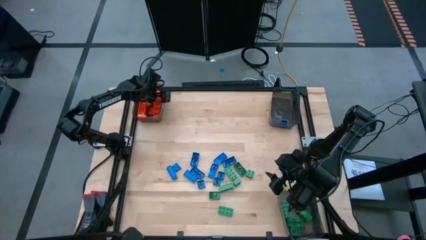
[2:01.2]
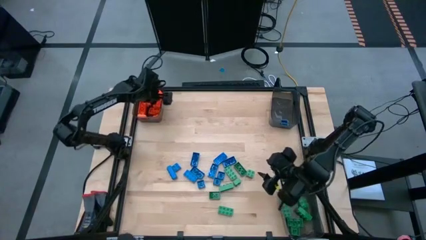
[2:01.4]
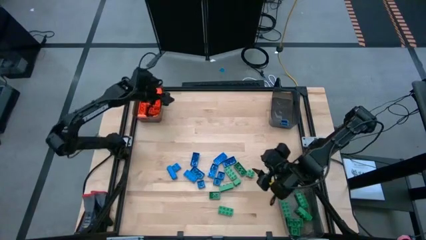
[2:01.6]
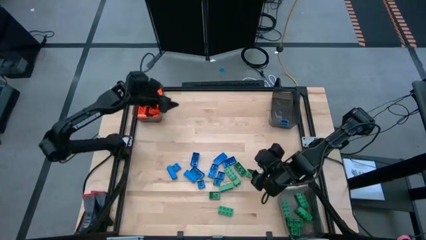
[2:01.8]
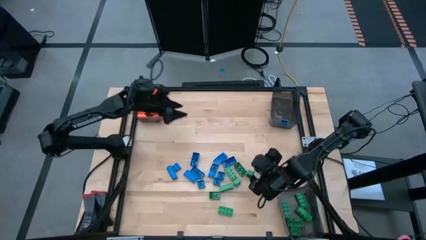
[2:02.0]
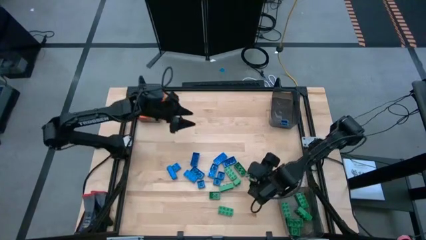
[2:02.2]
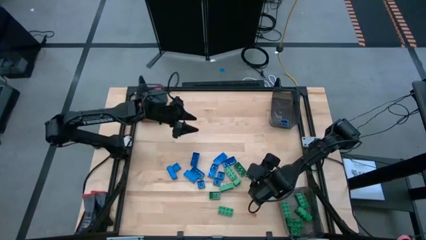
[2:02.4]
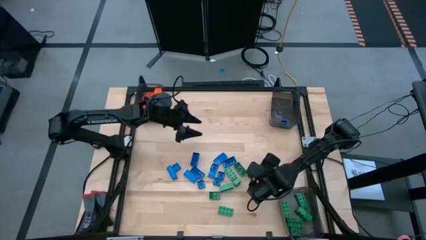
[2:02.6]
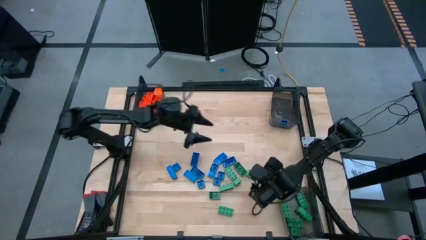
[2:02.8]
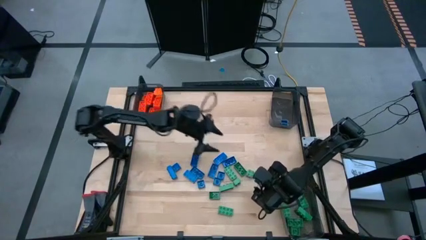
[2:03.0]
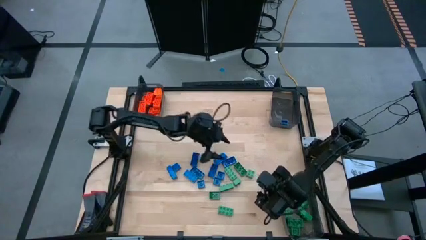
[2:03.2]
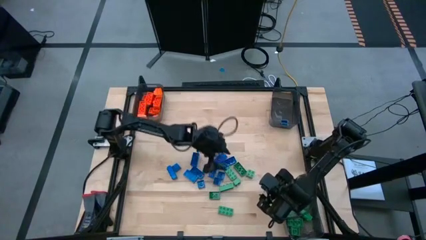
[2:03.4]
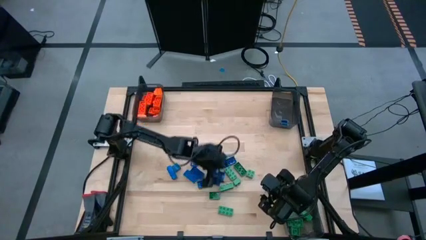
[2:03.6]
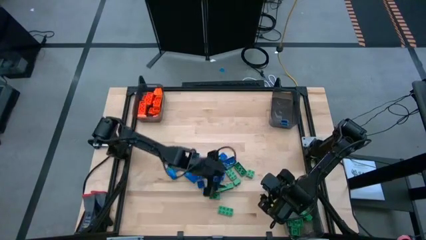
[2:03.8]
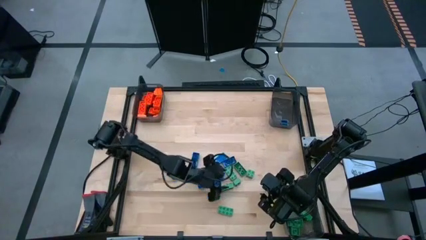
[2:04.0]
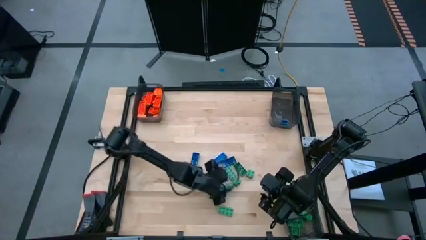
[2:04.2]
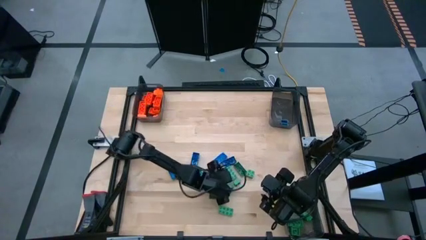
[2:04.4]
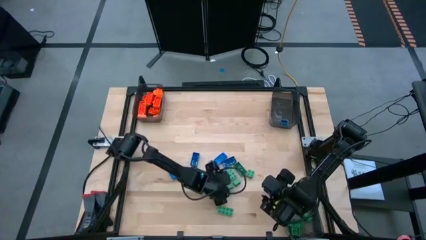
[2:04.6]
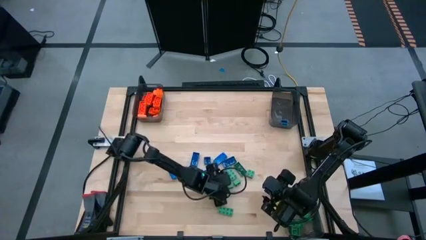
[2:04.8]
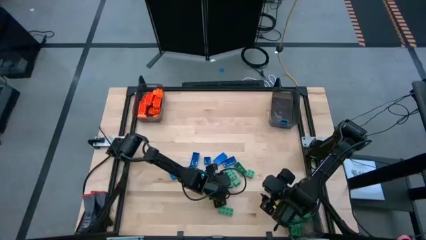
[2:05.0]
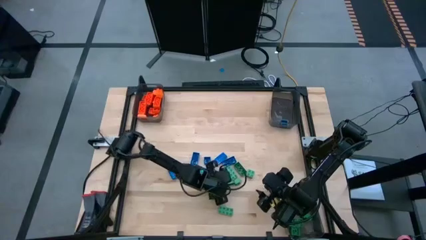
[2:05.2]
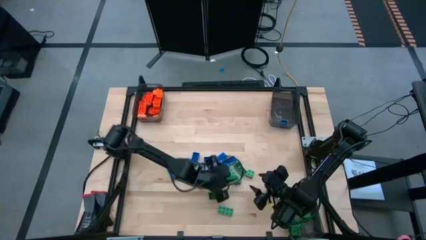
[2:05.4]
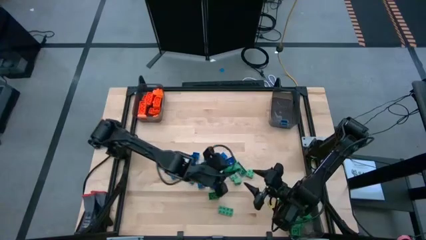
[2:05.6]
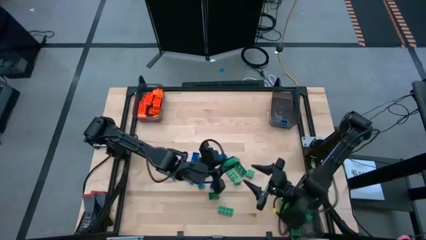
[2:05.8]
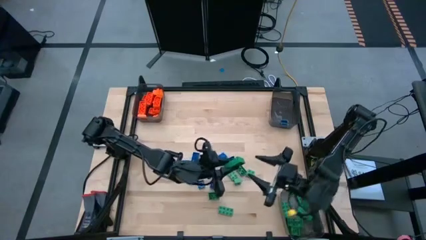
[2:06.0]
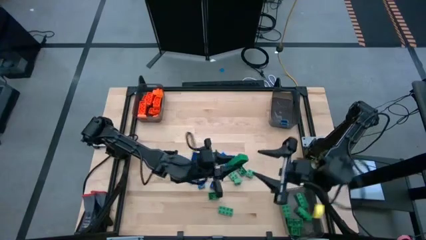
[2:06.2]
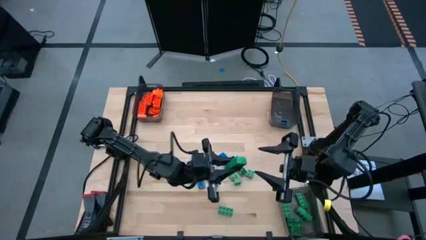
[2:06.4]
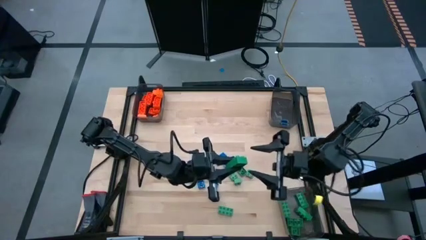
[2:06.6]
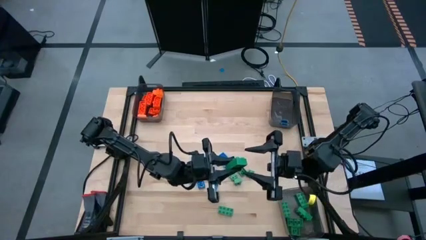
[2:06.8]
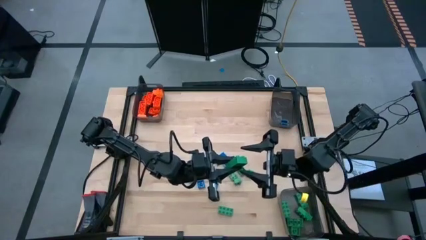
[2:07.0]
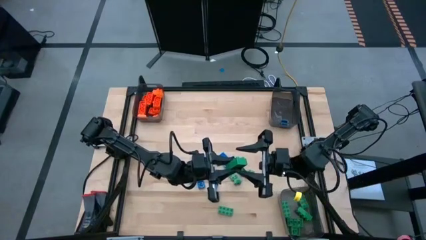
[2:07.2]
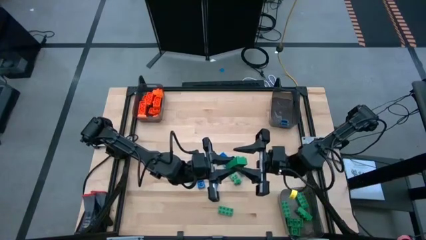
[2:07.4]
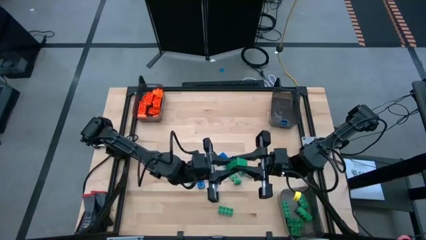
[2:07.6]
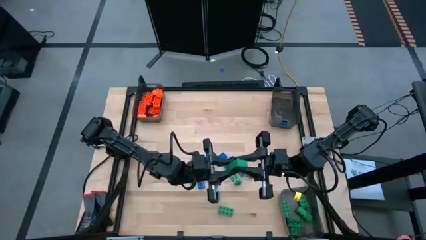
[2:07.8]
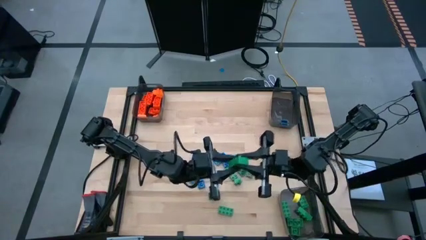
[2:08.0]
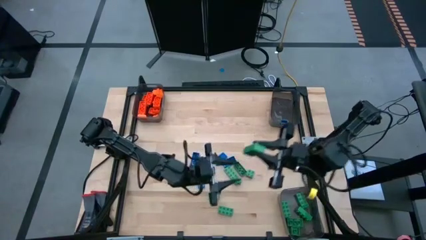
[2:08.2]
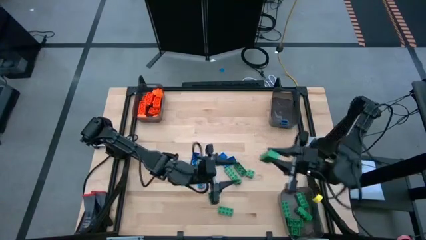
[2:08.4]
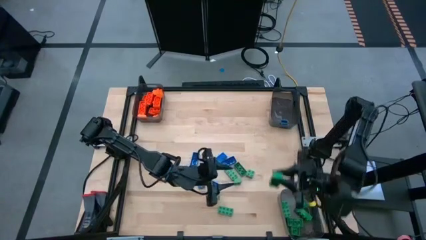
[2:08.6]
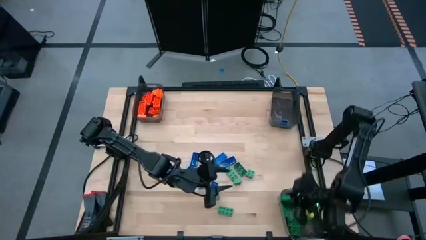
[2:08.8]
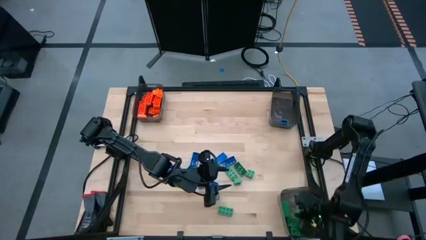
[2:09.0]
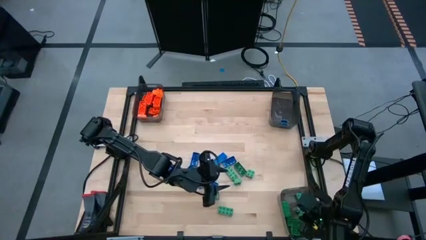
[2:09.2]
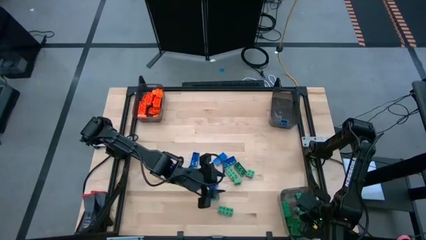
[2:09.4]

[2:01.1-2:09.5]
Task: Sort blocks
Put the green game piece into the bottom right black bin

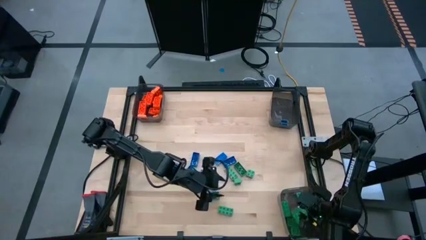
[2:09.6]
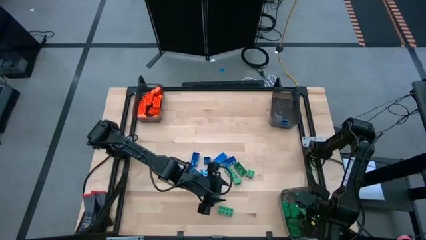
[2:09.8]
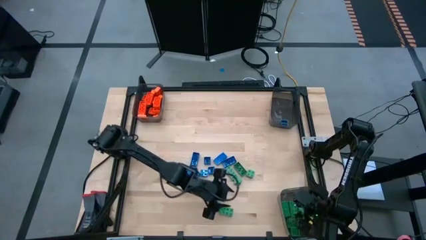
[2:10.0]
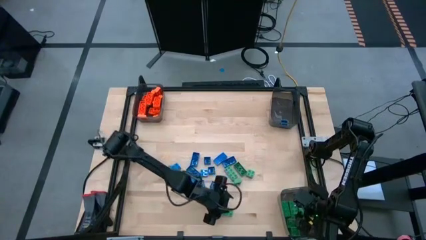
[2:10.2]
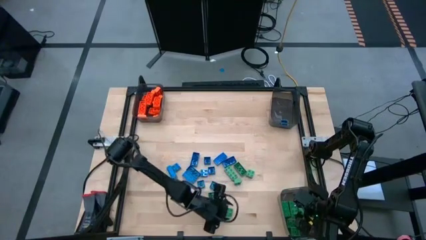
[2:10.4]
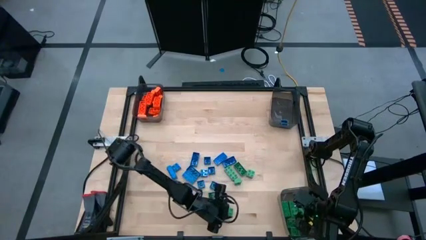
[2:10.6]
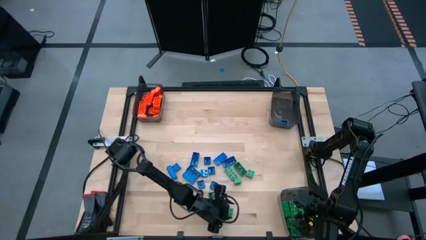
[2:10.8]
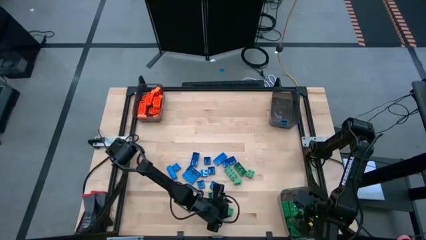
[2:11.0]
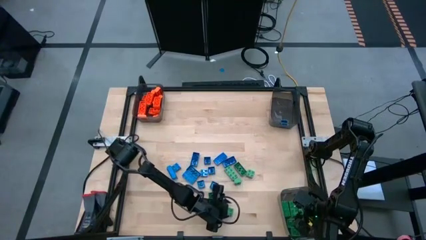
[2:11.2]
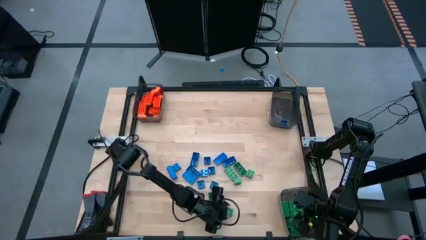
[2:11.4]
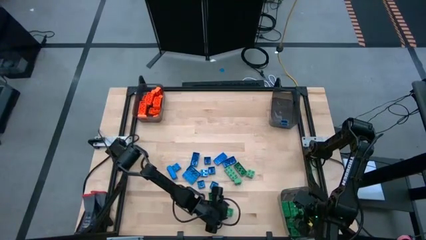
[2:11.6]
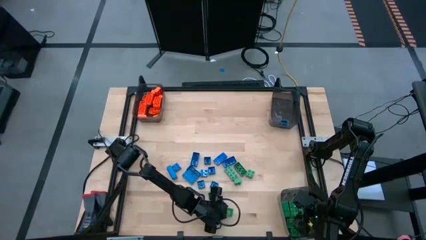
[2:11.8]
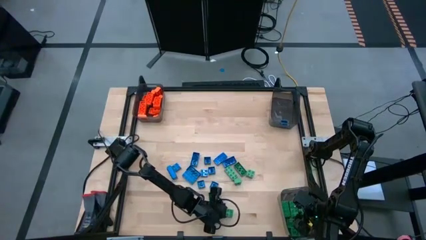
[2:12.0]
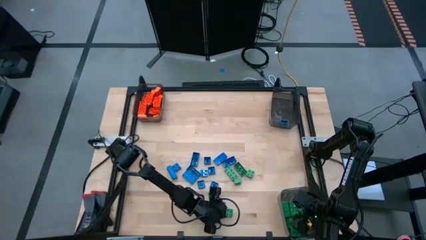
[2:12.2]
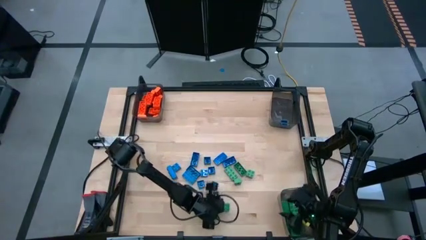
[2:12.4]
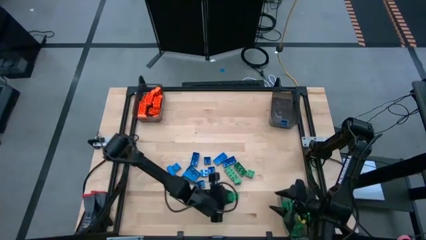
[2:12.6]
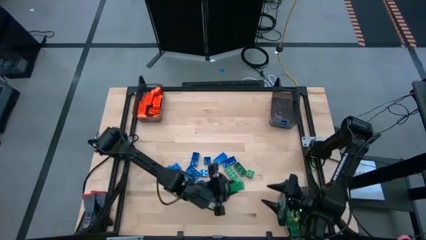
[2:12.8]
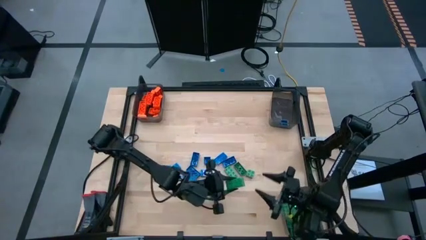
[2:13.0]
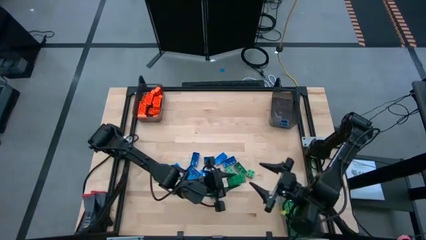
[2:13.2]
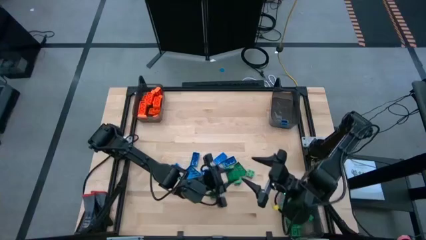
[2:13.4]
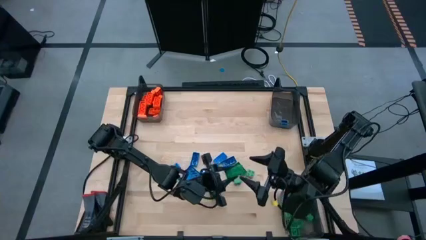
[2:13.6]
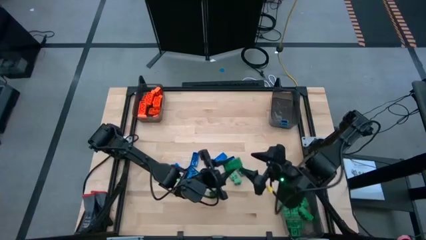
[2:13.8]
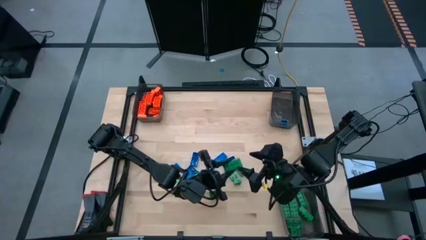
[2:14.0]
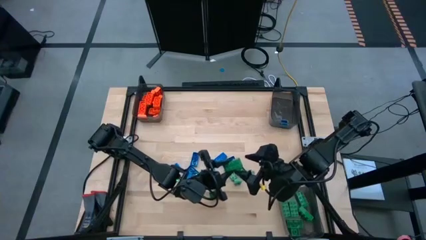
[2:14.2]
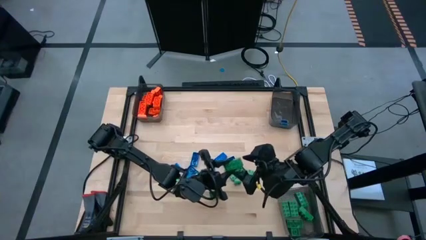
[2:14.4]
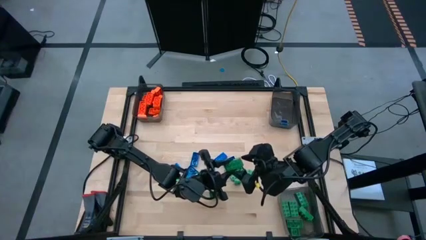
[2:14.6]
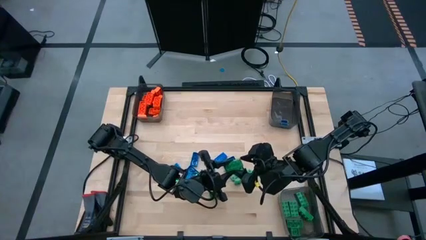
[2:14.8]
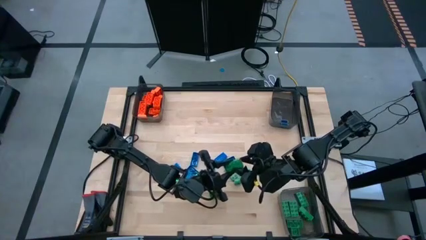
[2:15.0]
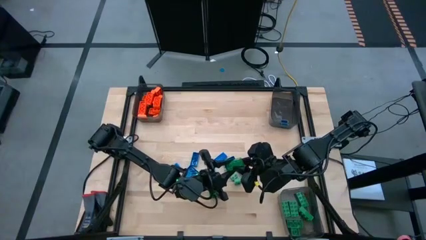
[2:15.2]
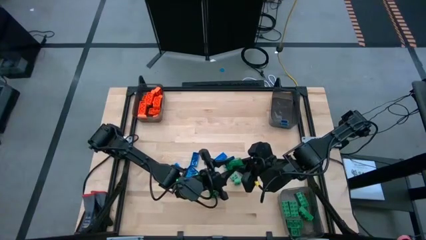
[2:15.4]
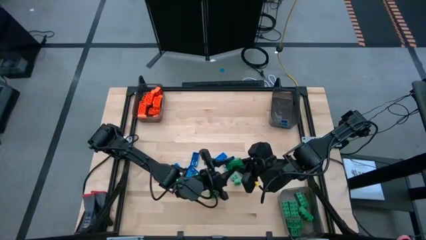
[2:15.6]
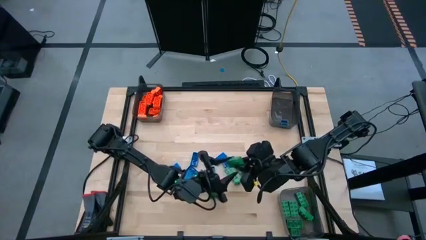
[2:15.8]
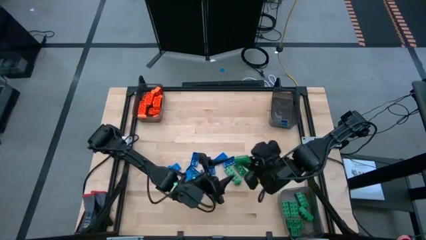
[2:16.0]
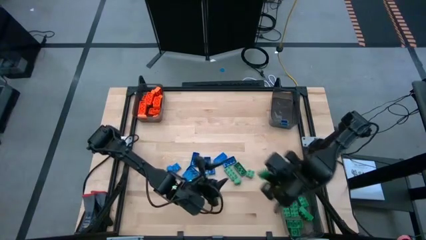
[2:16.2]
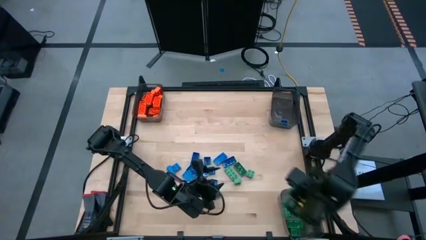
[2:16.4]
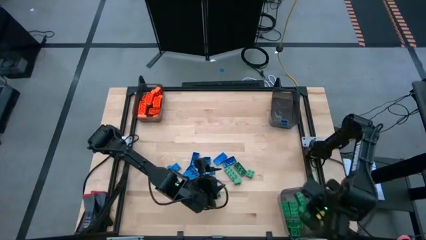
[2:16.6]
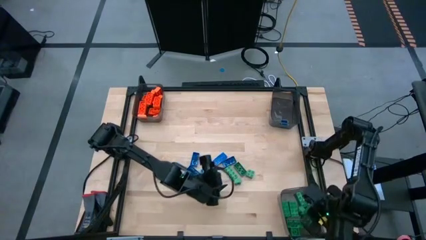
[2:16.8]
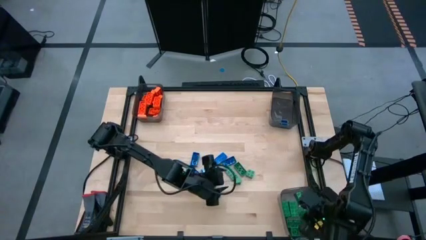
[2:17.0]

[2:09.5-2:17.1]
Put the green game piece into the bottom right black bin
